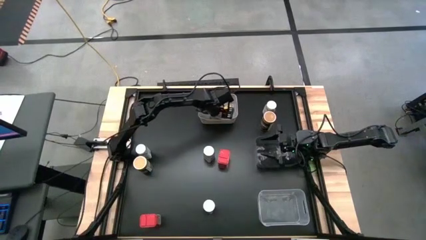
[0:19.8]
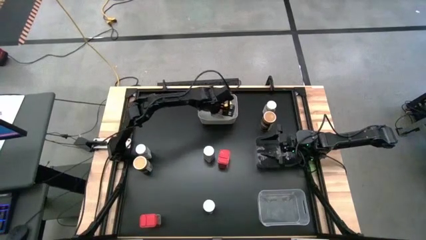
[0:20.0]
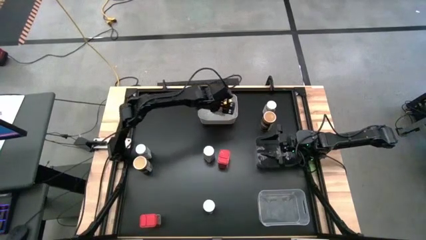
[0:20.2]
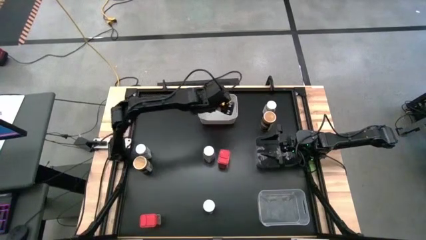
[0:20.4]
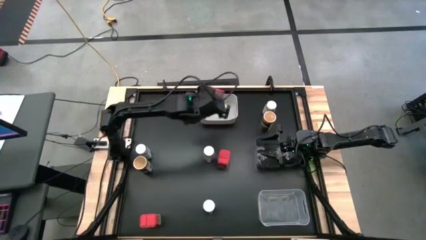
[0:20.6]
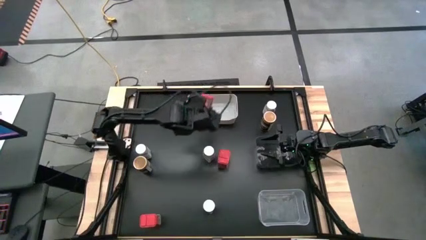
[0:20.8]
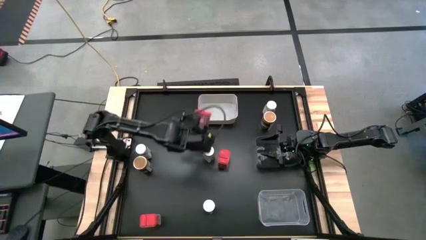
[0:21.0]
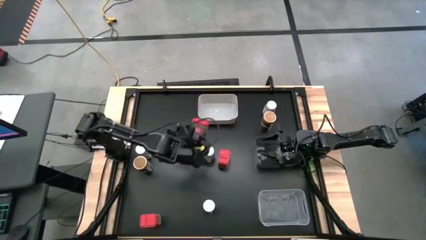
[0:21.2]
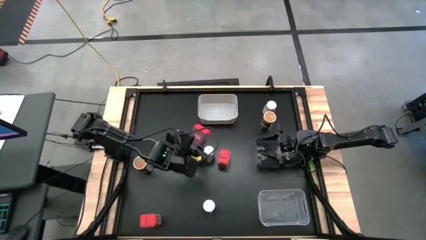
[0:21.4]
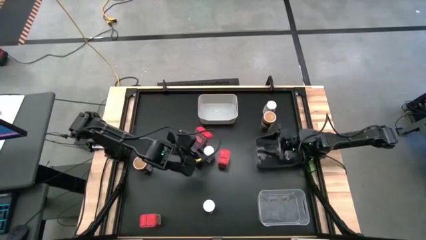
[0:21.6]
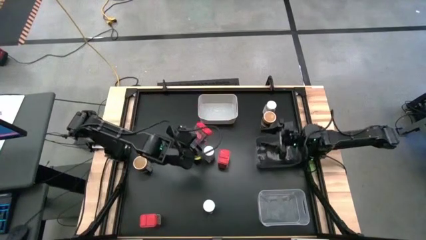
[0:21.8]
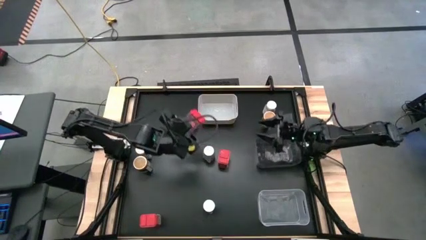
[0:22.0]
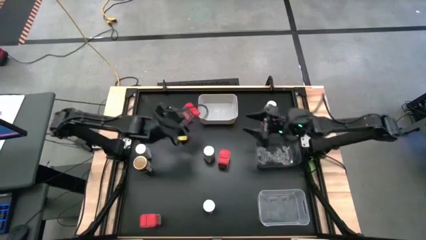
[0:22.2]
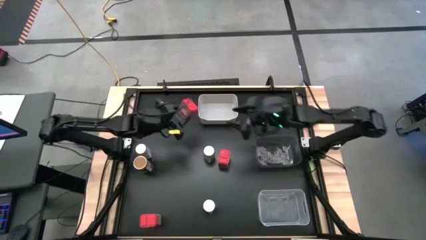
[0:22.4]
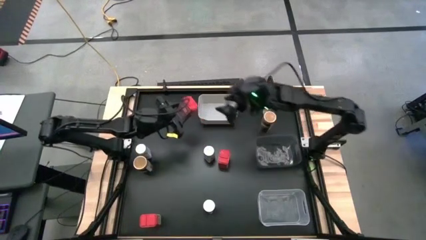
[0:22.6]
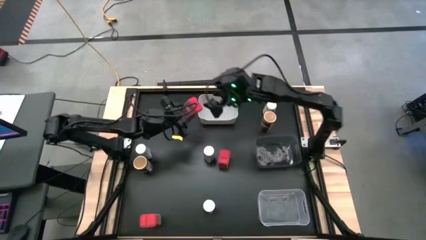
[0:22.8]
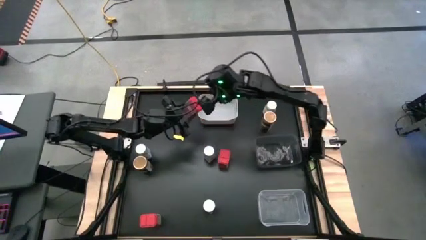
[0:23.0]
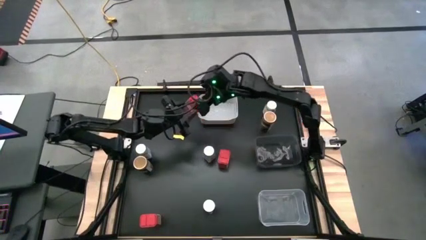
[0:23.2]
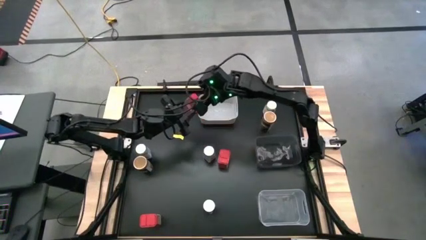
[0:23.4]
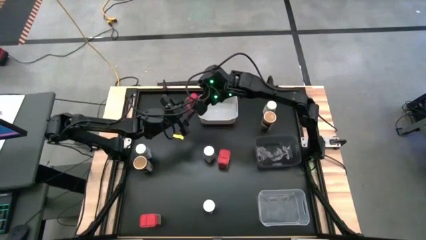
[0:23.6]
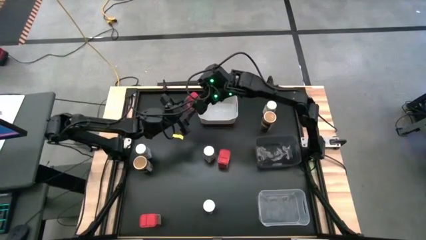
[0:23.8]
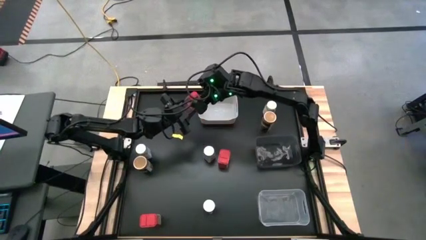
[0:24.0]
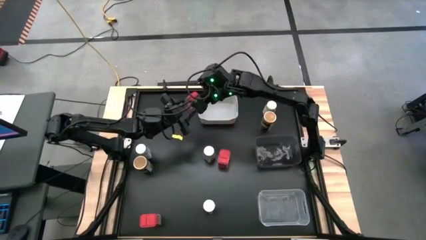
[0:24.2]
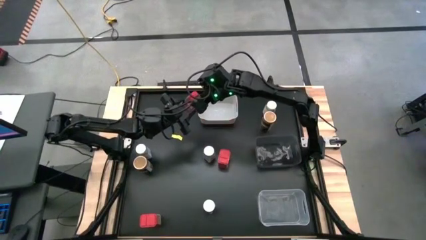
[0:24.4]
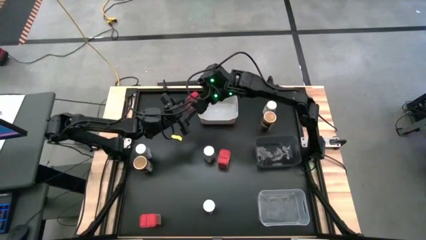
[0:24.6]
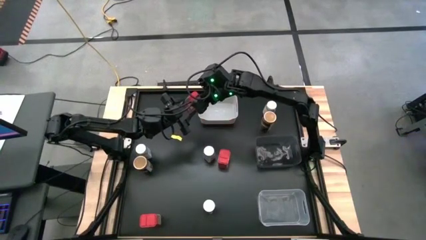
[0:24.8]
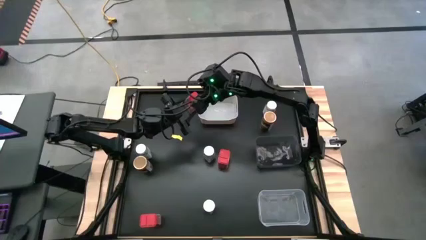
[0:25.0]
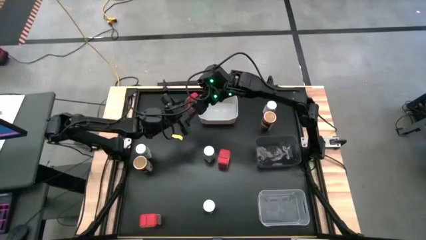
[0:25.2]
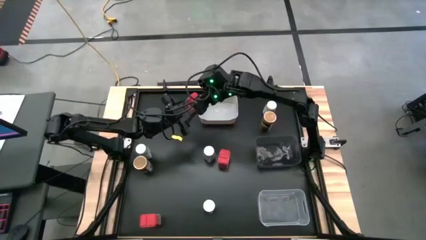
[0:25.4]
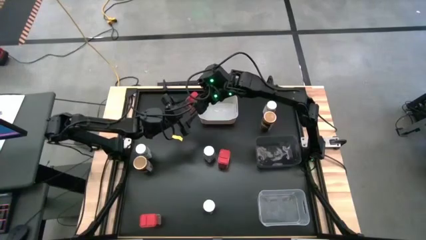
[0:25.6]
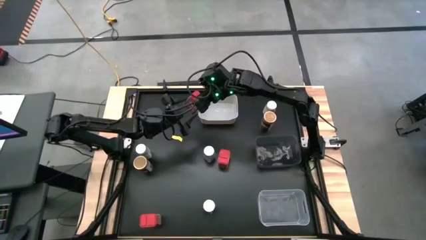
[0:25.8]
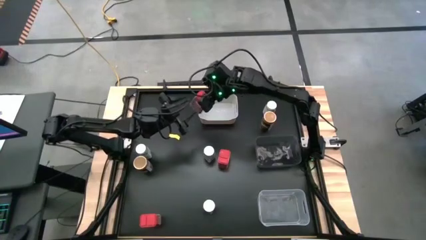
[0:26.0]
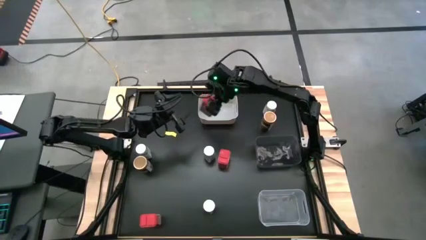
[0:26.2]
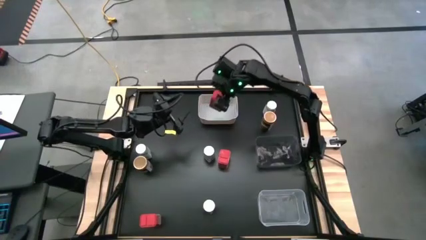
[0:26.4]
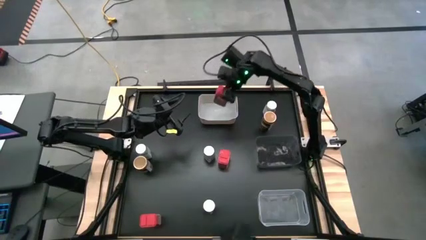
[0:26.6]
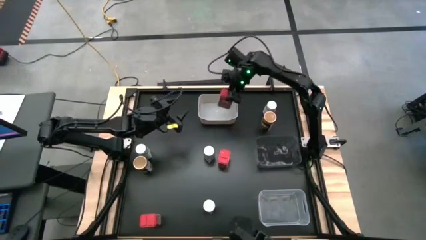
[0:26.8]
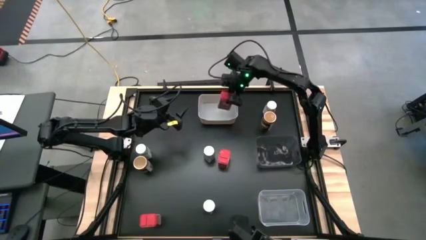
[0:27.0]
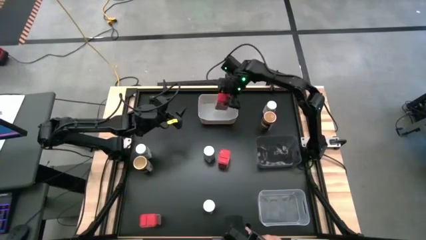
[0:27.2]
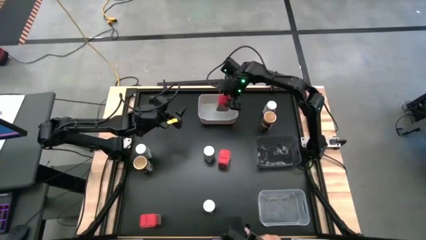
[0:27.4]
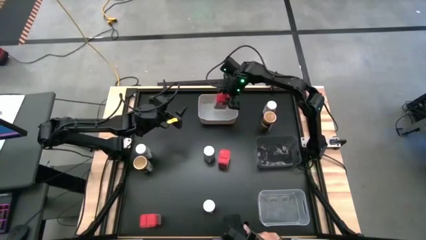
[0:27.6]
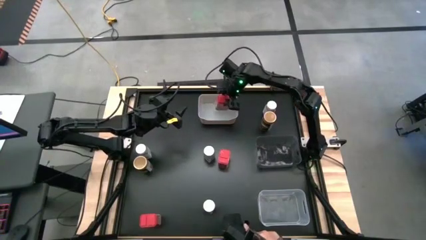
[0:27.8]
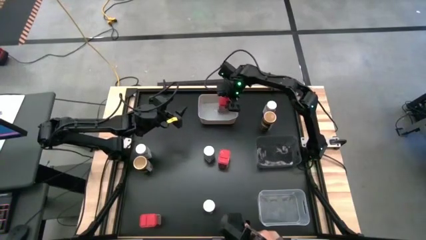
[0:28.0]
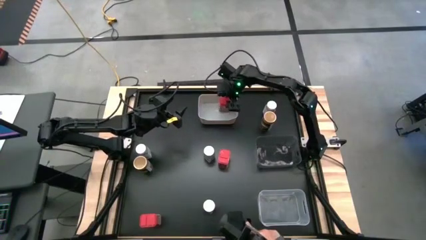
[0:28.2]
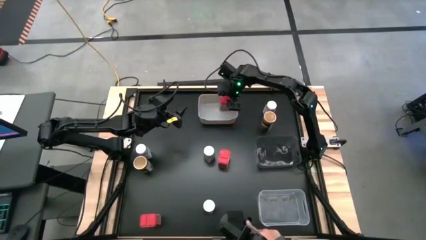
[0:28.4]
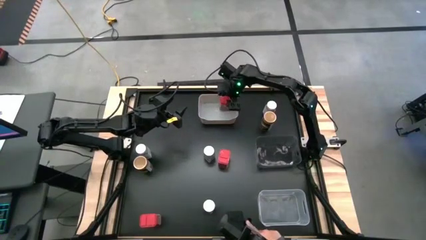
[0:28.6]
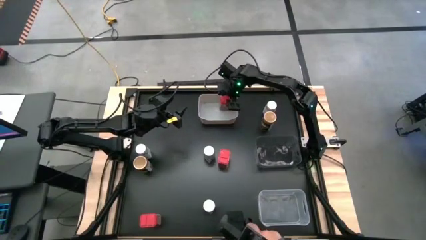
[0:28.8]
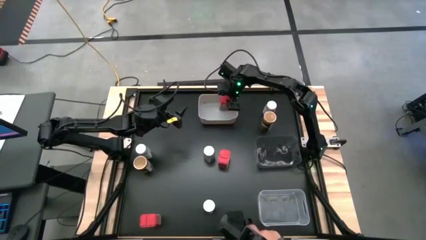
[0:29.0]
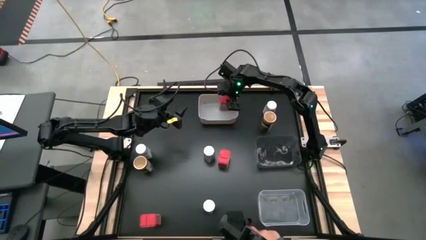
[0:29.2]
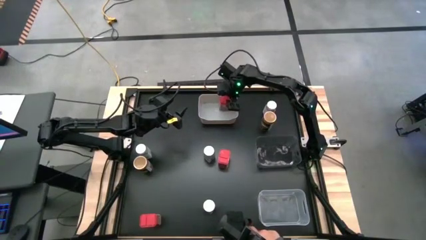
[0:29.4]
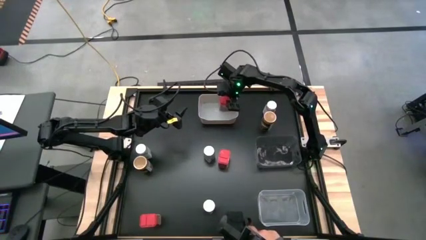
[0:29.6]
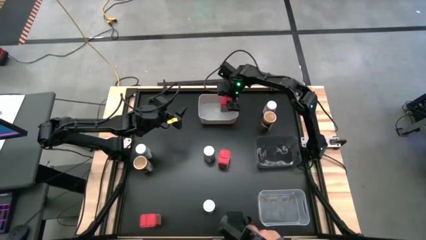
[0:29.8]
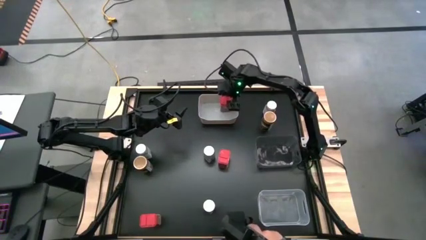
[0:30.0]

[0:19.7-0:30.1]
Task: Sort spices by type
Put the top left red seasoning can into the gray bin

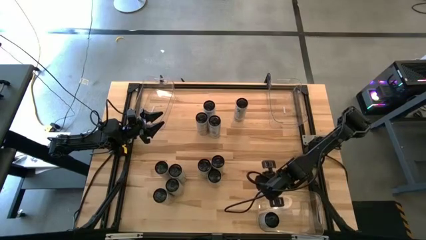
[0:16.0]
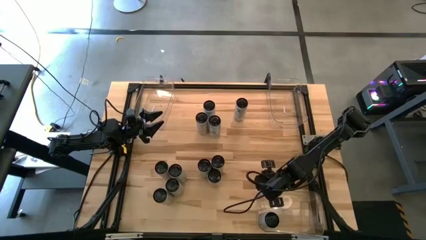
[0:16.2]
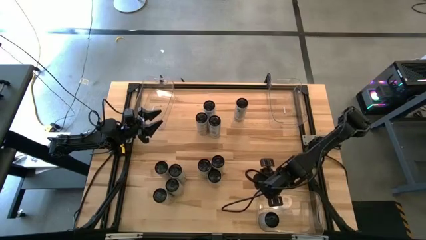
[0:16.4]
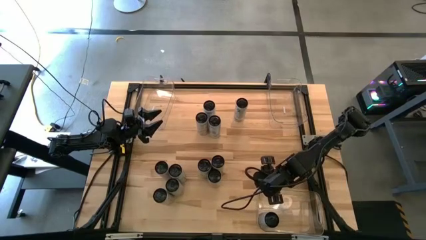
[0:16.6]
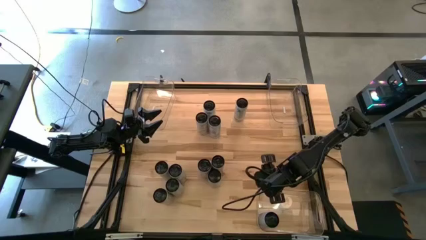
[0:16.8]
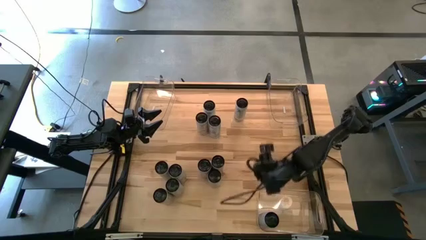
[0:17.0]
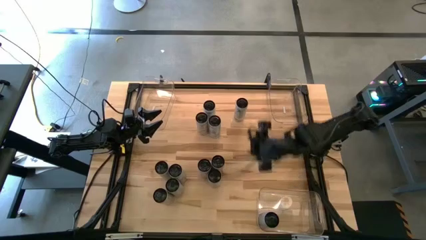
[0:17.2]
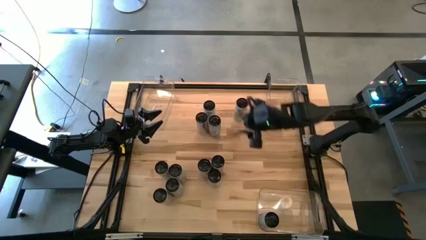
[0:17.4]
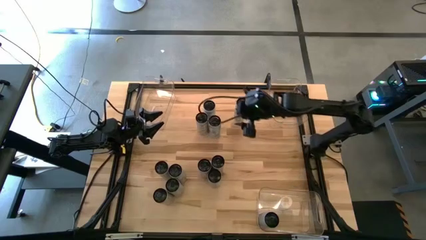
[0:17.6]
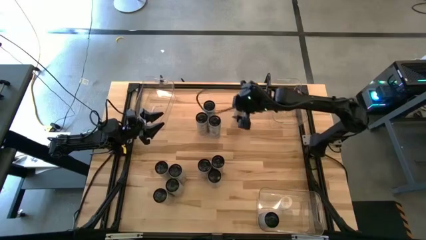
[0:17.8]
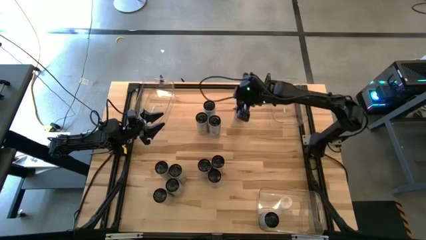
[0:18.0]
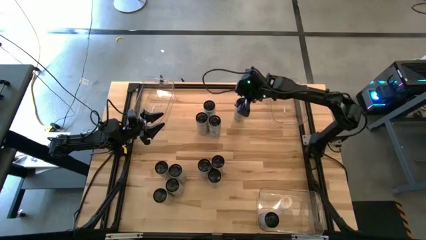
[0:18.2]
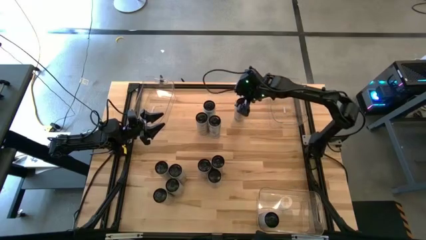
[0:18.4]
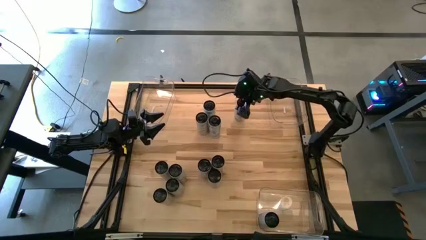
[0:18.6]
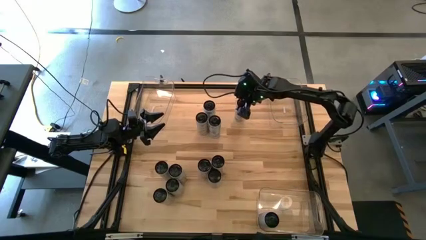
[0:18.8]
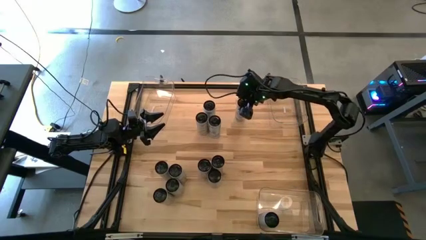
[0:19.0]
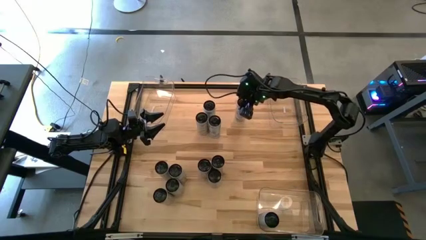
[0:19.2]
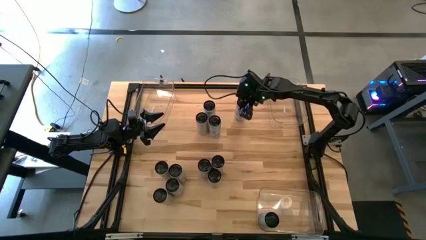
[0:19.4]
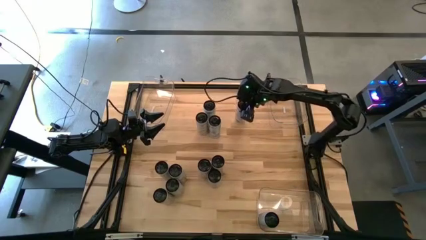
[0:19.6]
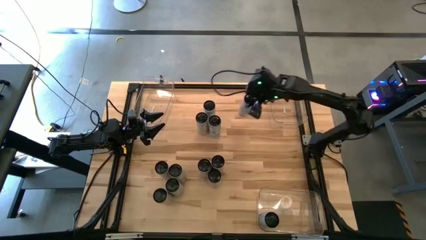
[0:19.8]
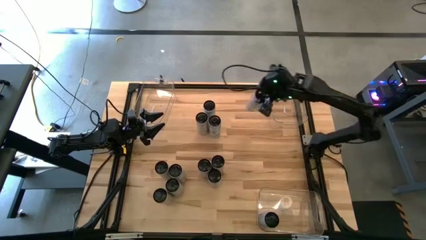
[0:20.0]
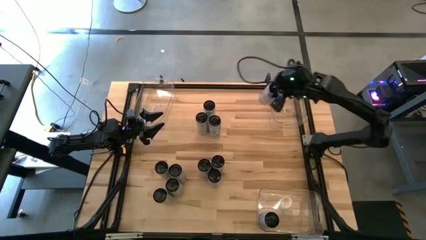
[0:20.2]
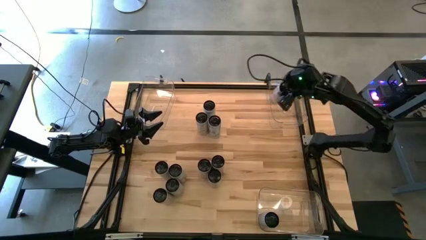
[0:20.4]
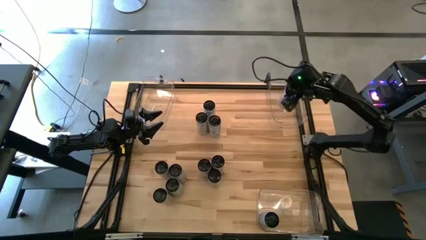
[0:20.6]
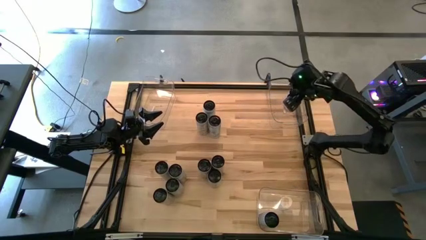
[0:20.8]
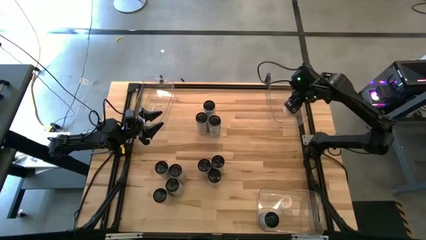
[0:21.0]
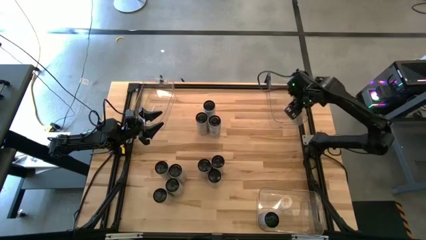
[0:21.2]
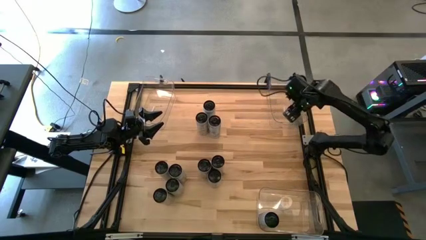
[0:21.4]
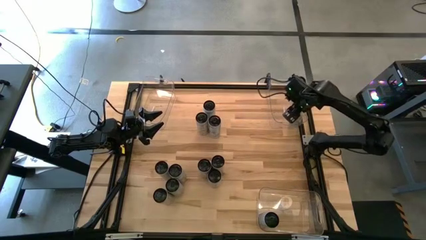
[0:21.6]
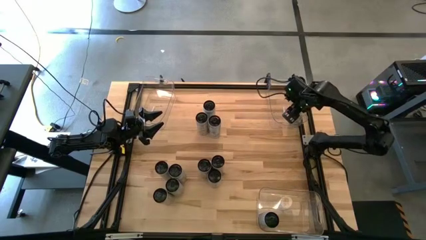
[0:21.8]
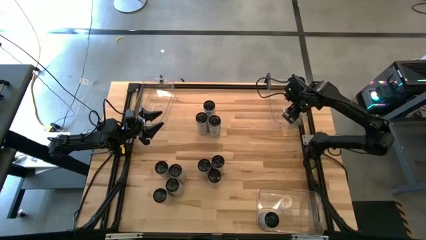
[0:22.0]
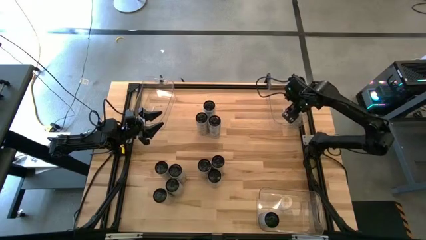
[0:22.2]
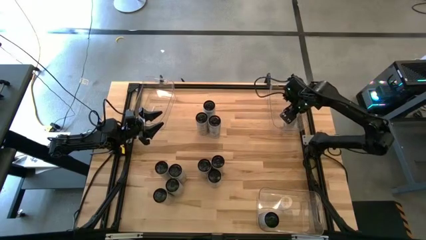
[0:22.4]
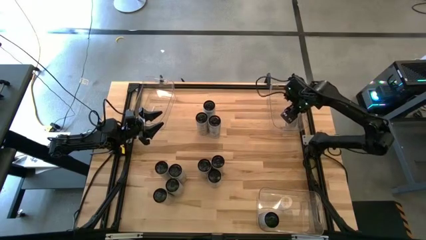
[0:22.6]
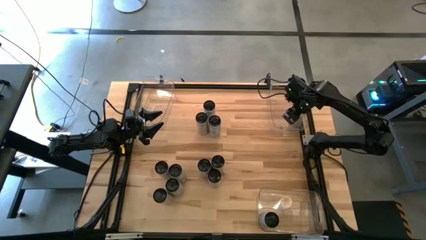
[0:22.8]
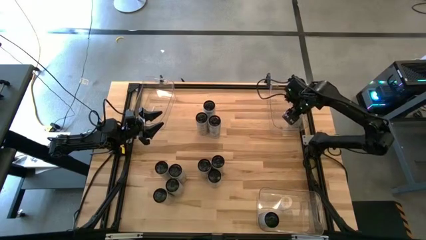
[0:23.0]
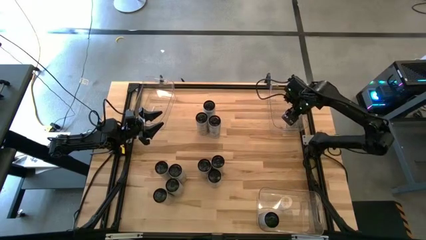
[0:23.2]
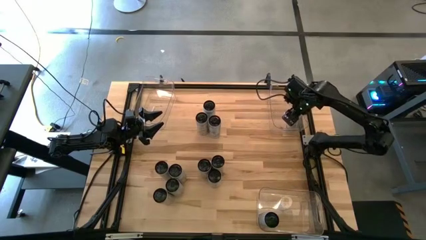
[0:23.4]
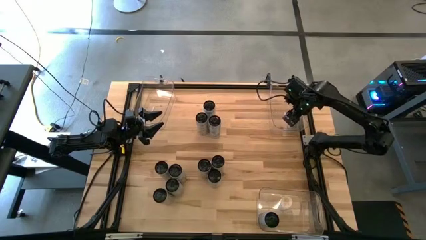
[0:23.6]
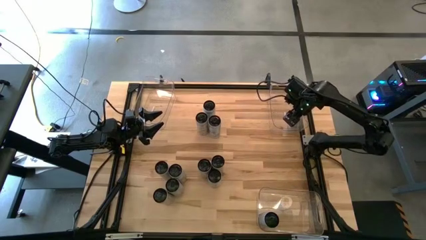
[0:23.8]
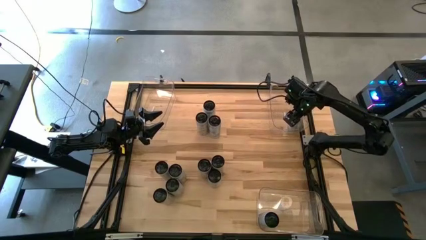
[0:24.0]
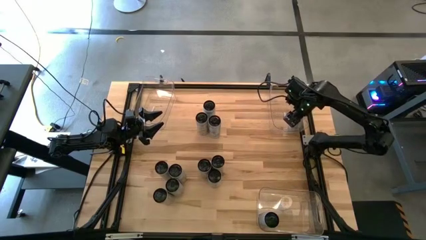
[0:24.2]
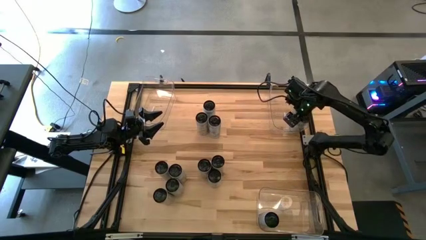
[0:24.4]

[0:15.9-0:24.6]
Task: Sort soda cans
Put the white/pink soda can into the top right transparent bin
